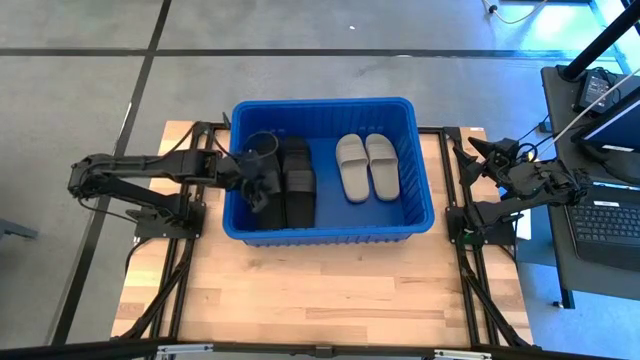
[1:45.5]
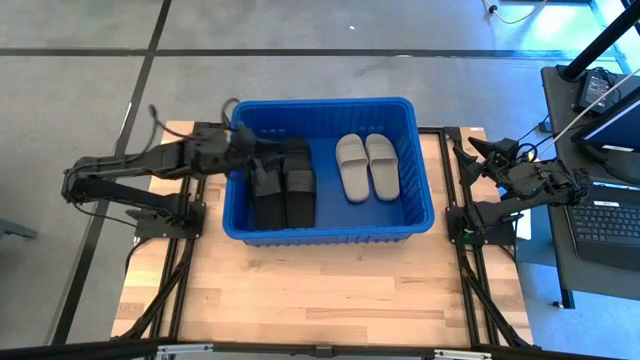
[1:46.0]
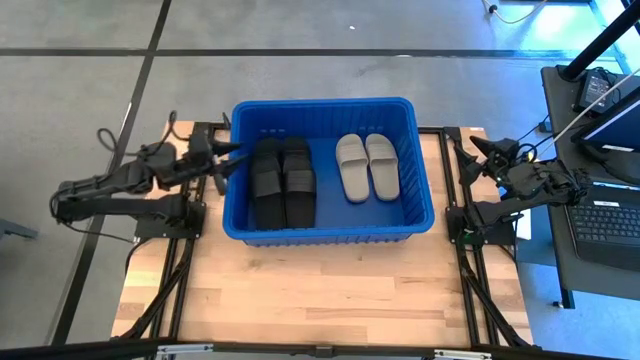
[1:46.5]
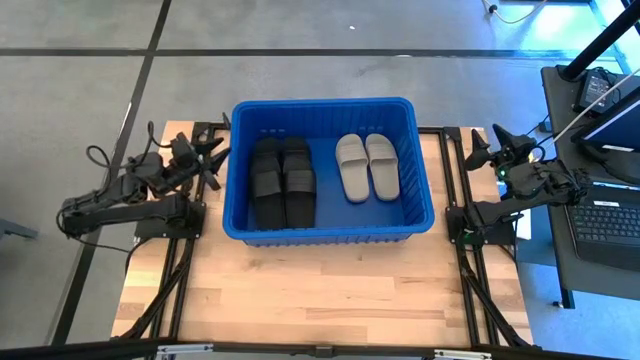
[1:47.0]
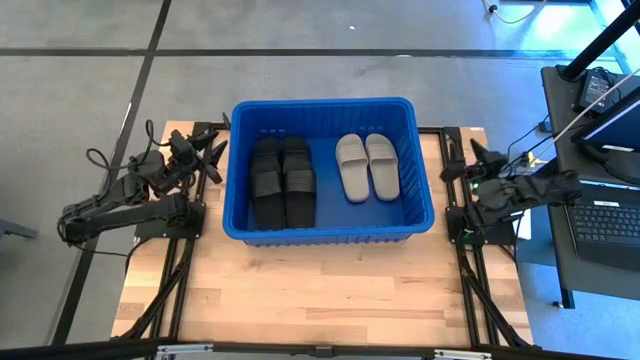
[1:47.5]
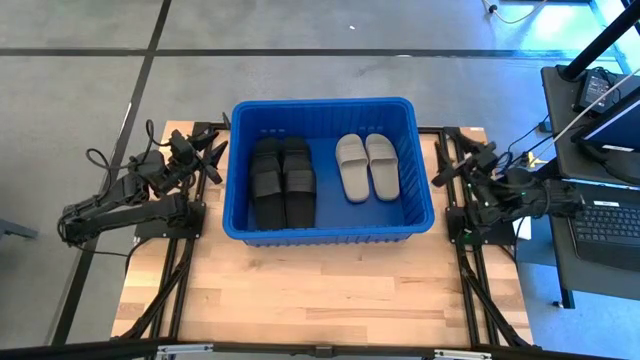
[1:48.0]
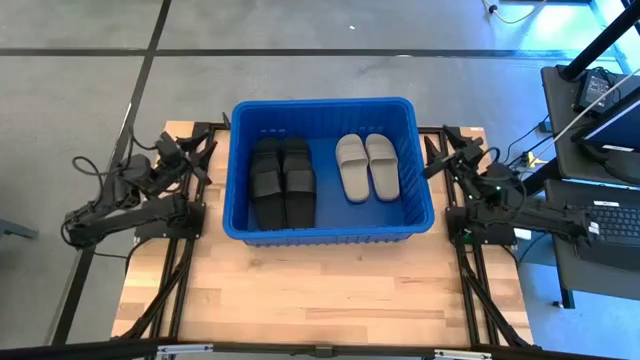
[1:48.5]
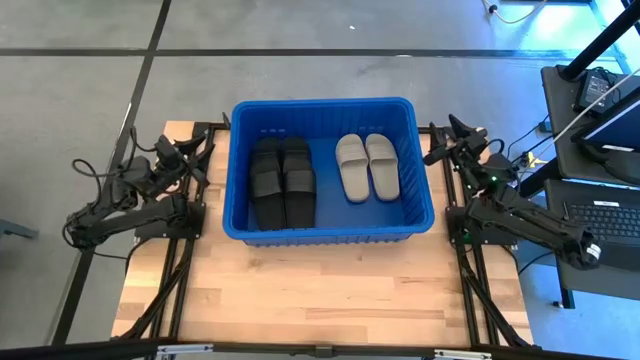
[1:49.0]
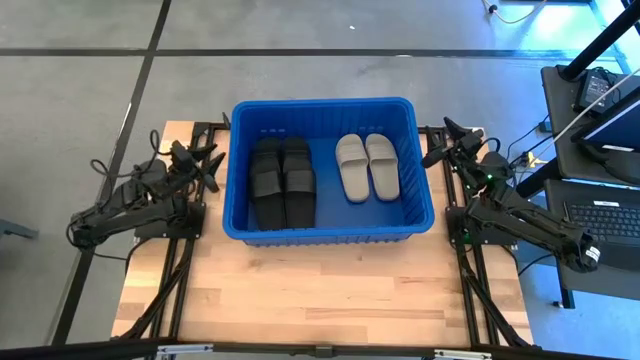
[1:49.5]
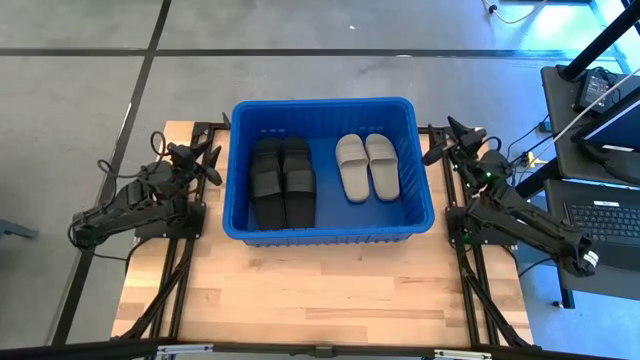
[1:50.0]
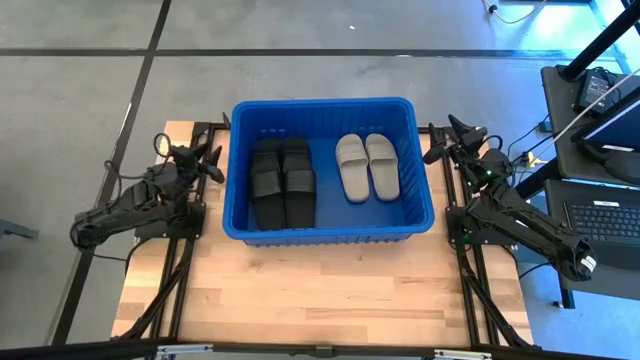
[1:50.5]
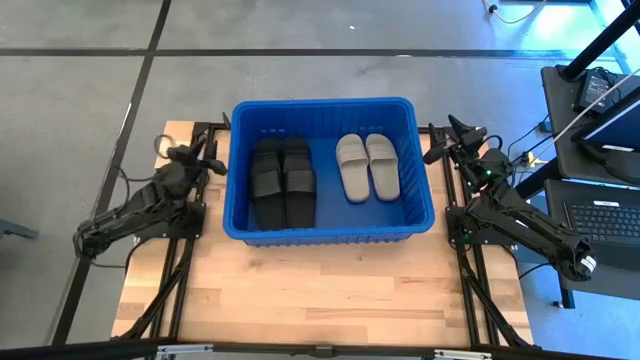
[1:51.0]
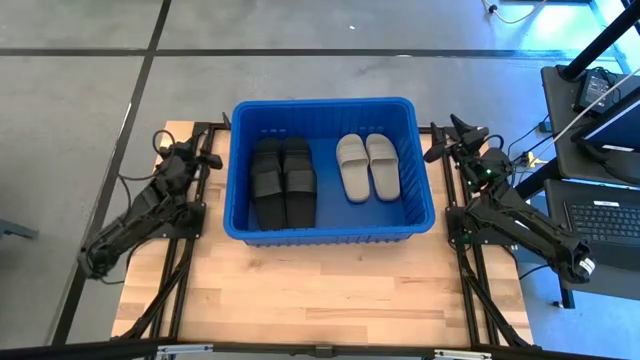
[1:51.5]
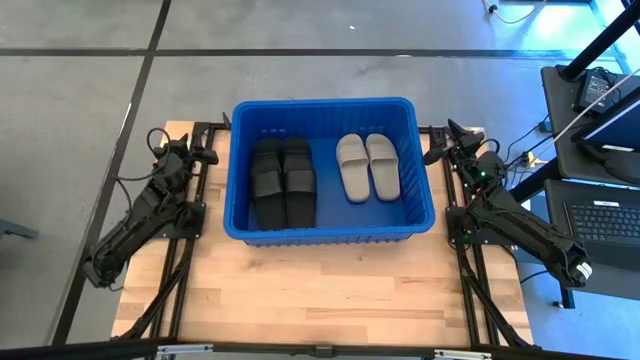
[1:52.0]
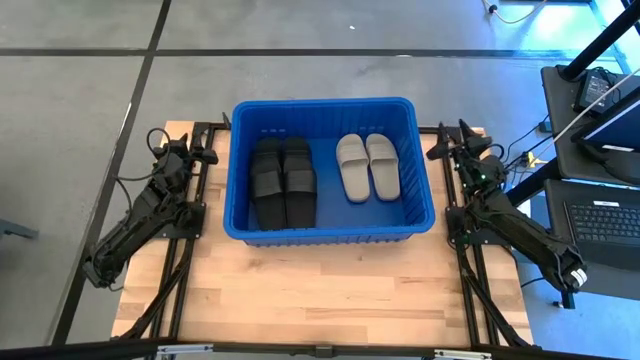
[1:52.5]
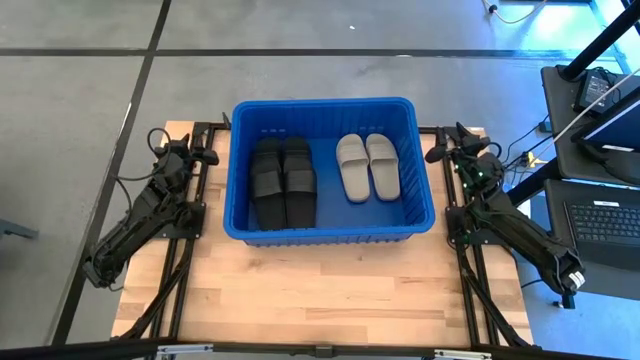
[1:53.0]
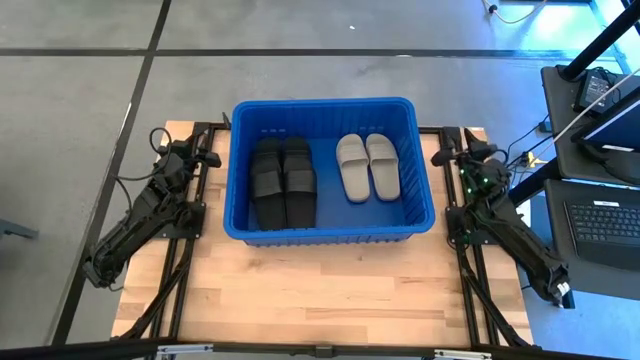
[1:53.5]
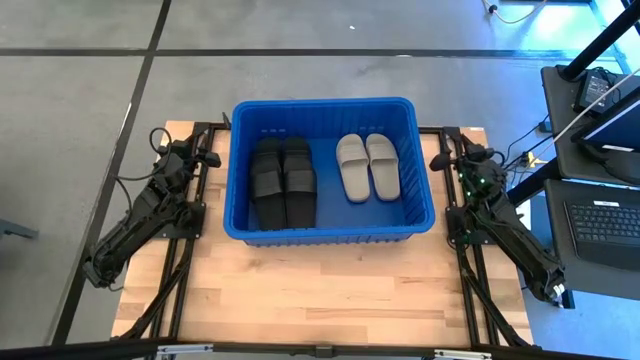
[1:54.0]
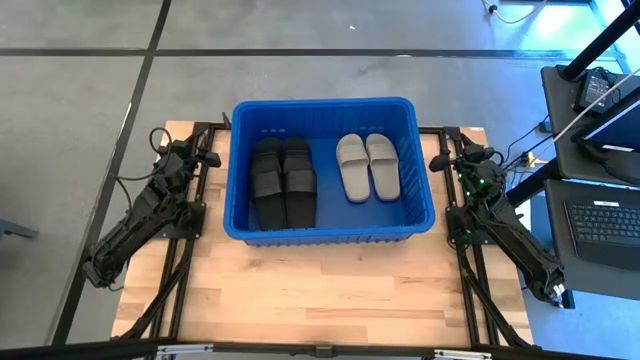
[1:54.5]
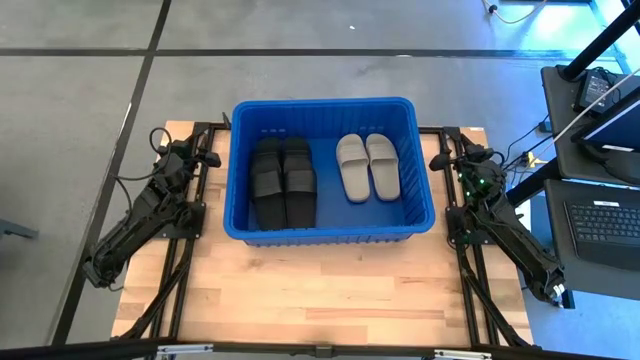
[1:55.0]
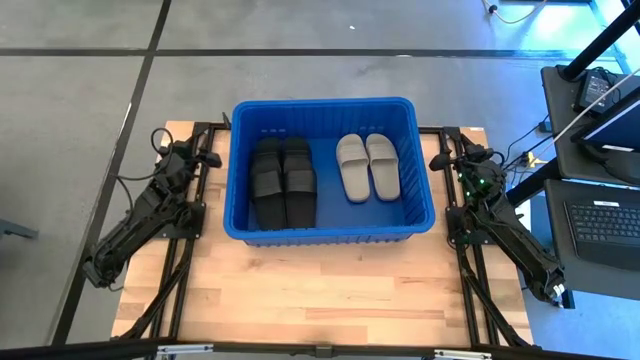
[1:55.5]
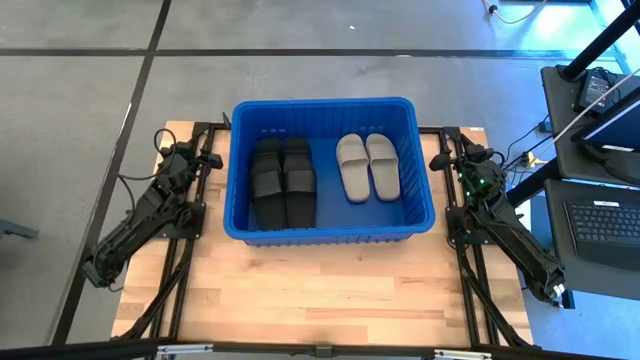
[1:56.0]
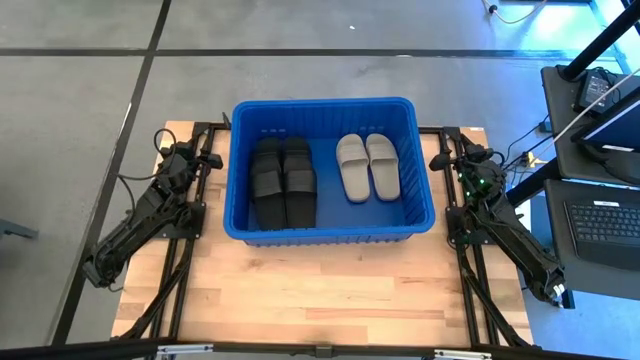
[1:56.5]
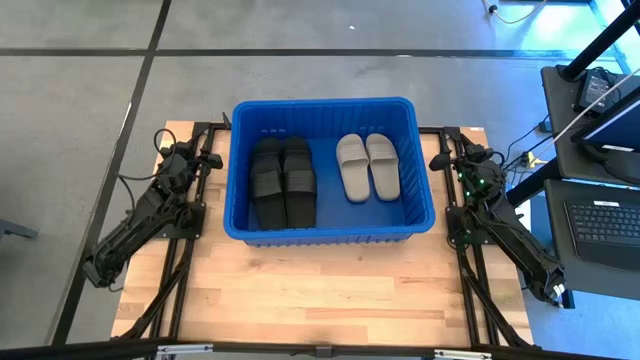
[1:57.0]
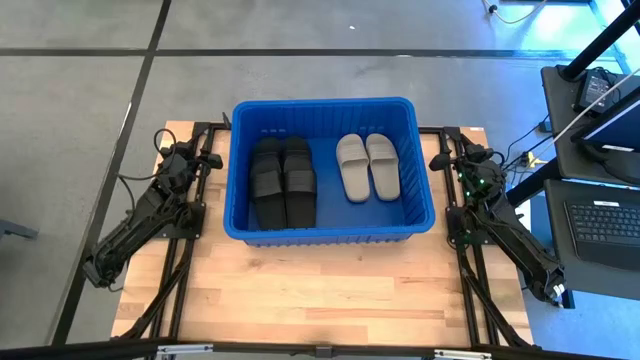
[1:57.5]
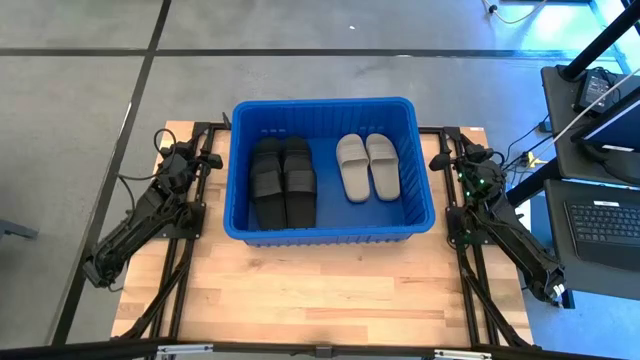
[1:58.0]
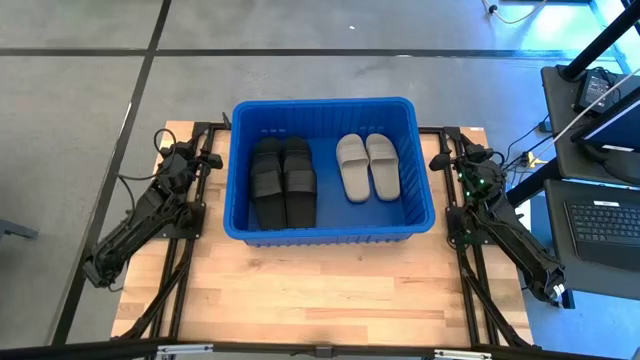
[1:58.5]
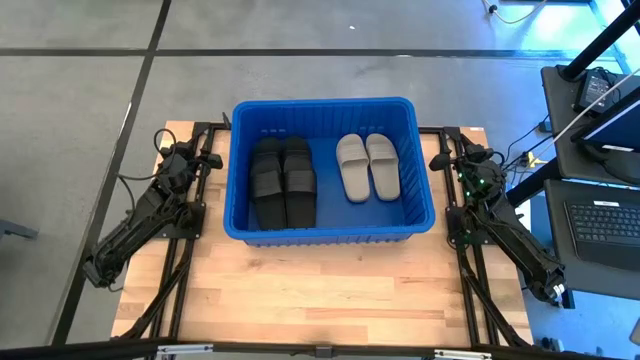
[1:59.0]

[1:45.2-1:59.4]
Task: Pick and place slides into bin
Return to Home Position

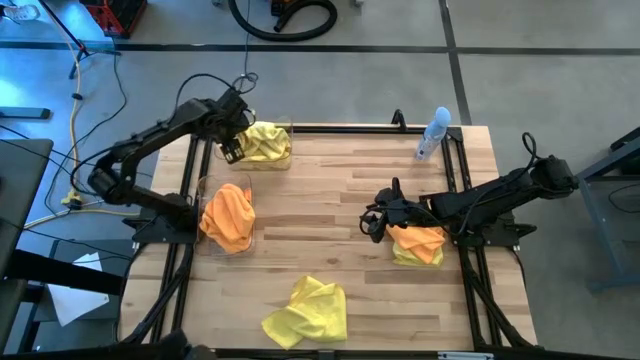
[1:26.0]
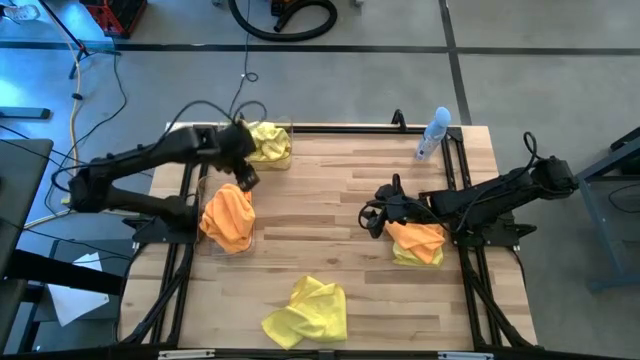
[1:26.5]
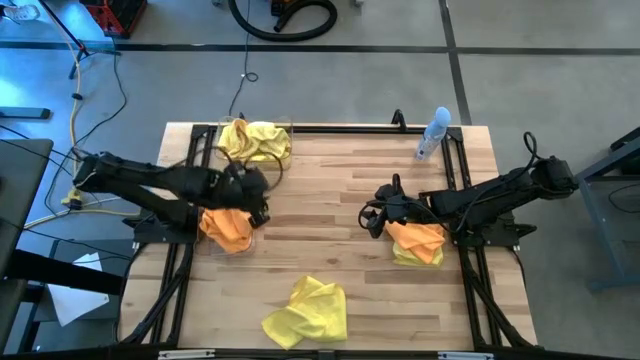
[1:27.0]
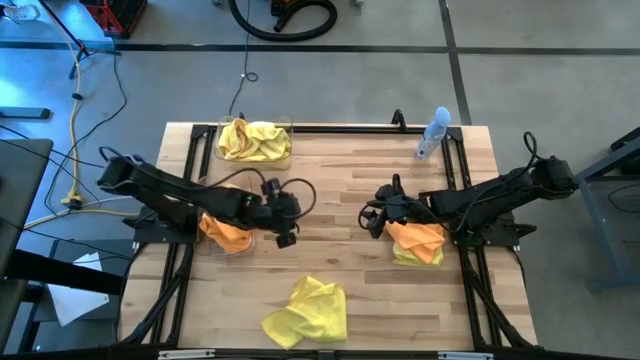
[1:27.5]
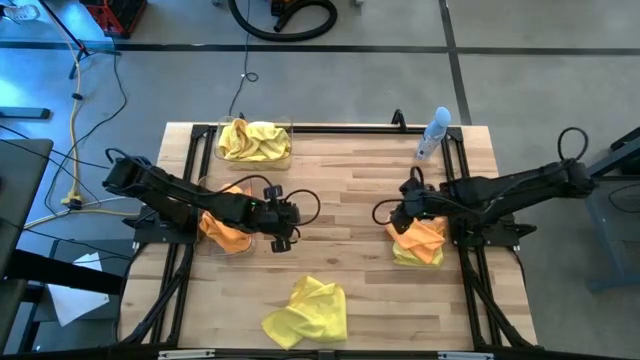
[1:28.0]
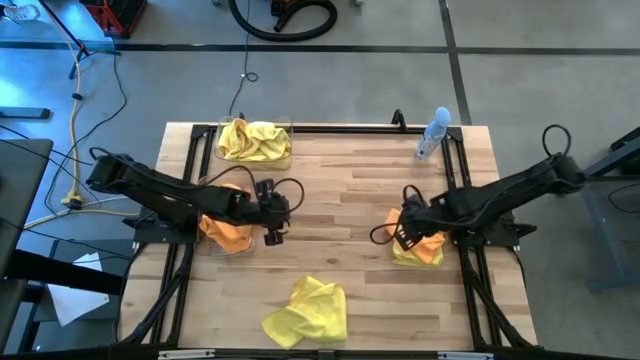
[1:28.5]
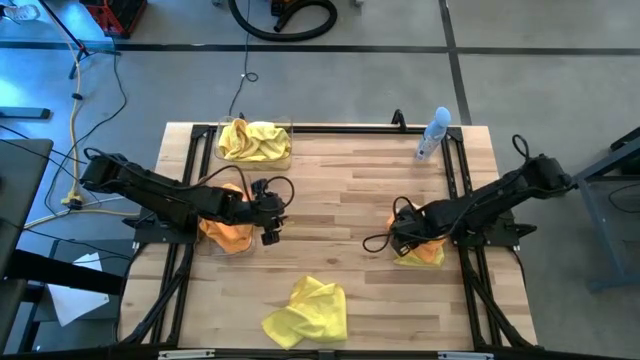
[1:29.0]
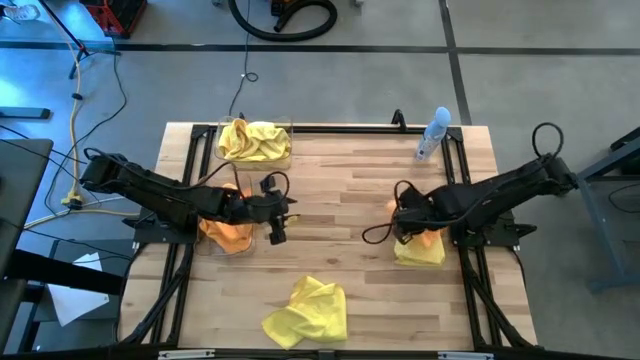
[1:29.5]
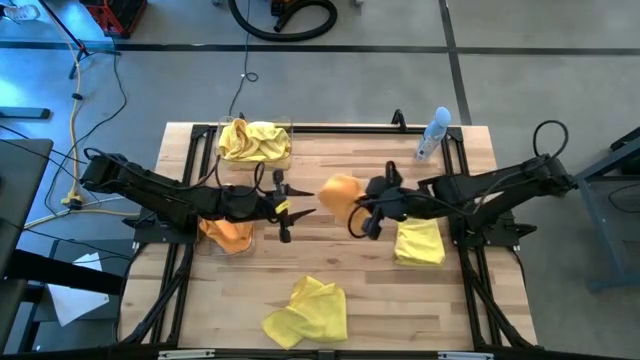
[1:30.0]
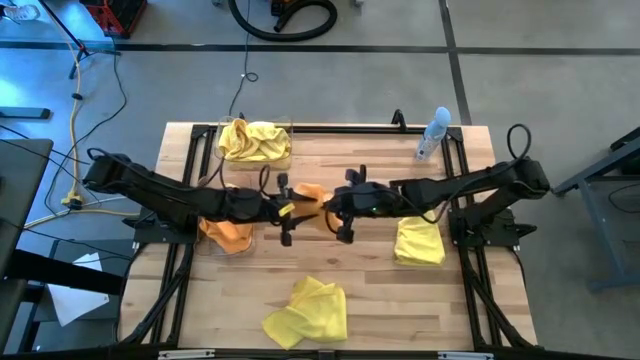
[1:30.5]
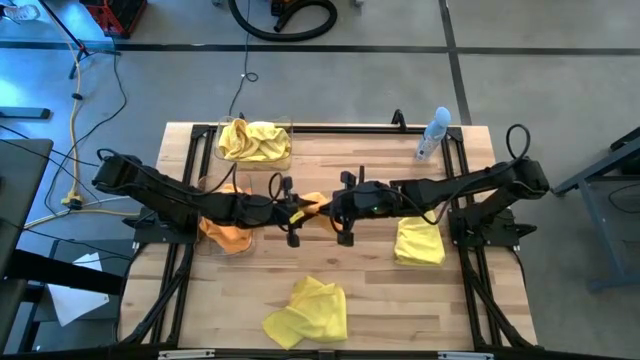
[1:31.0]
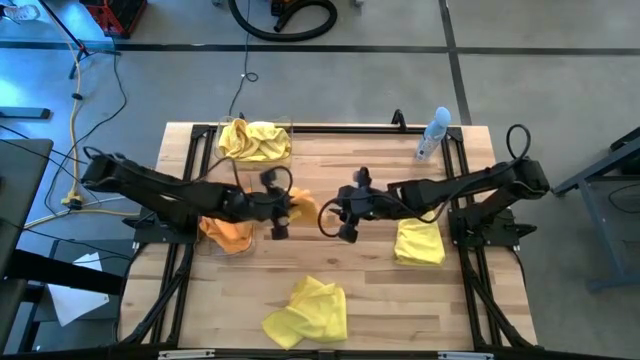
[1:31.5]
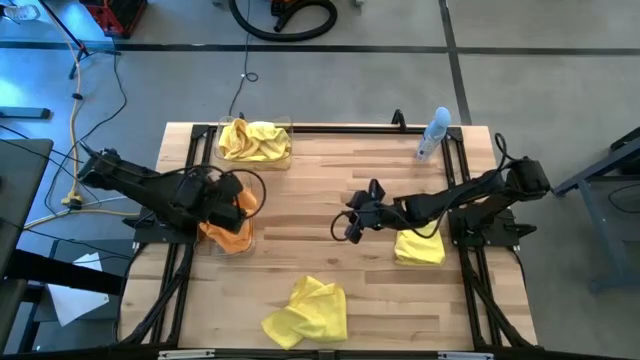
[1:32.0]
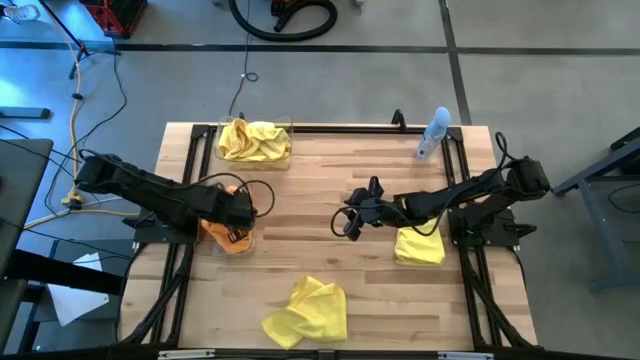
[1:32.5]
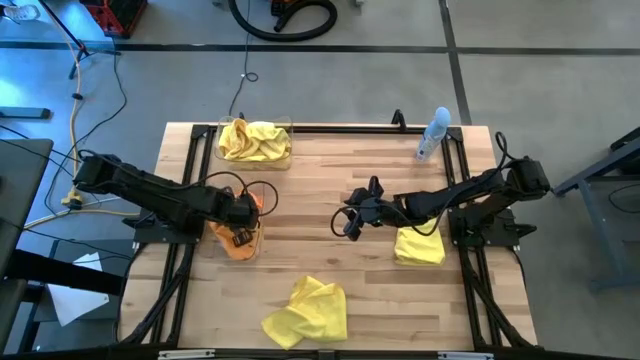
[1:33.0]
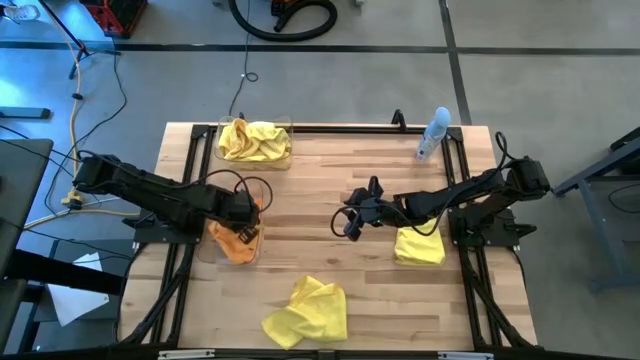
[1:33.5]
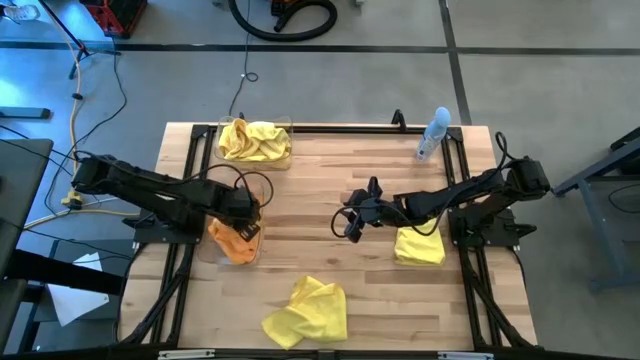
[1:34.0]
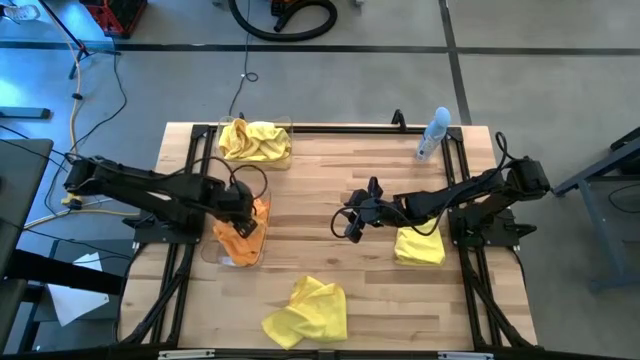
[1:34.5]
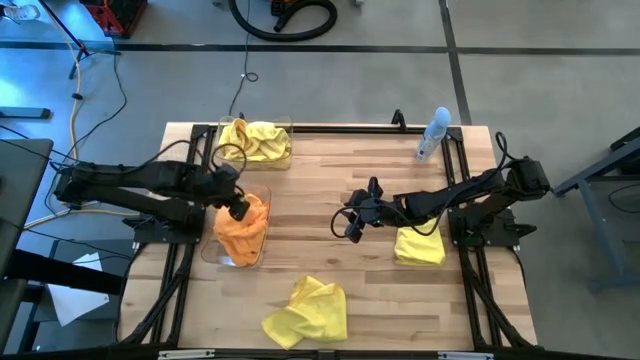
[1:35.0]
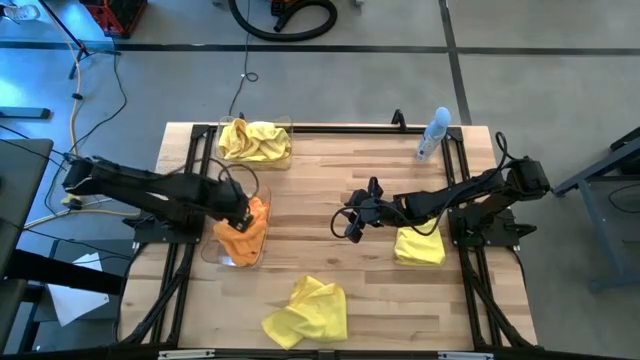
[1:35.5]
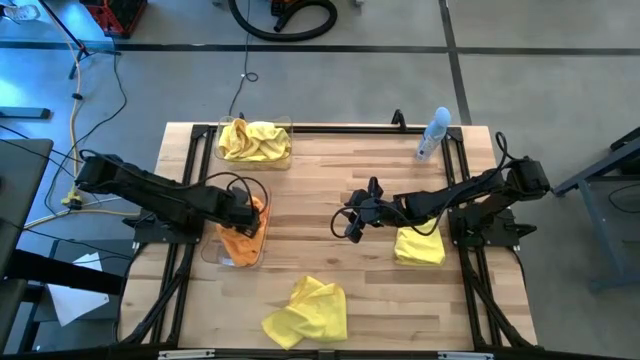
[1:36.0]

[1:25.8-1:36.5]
Task: Sort microfiber towel by color & place in baskets
Put the orange microfiber towel into the bottom transparent bin
